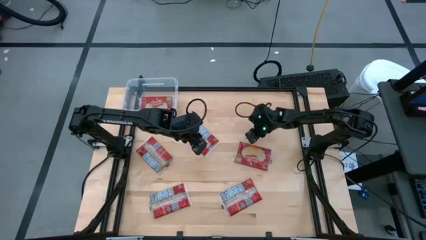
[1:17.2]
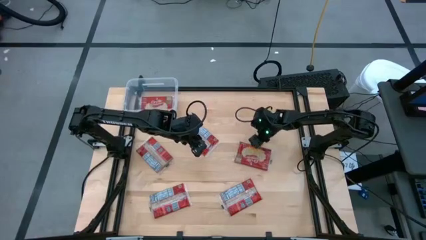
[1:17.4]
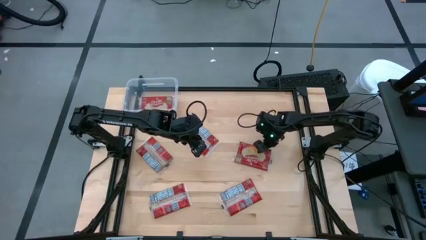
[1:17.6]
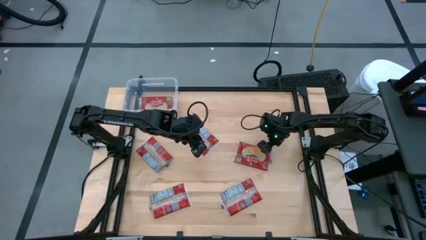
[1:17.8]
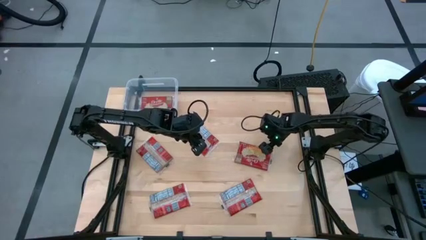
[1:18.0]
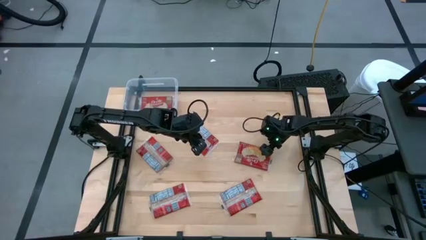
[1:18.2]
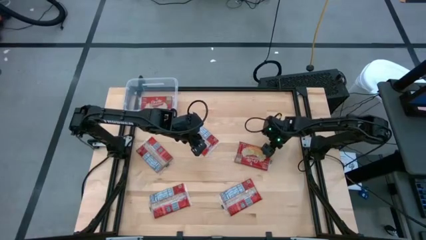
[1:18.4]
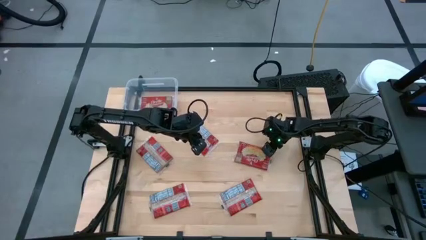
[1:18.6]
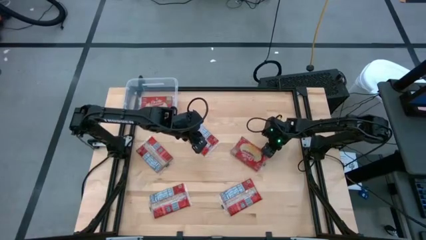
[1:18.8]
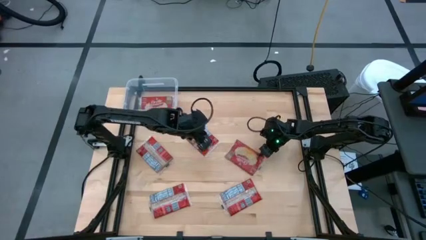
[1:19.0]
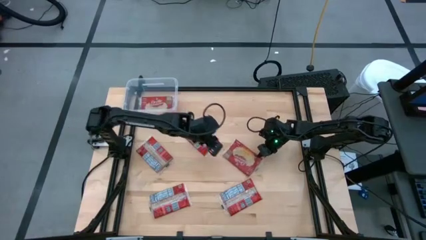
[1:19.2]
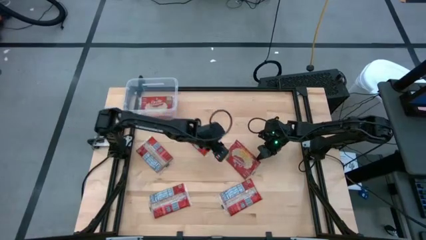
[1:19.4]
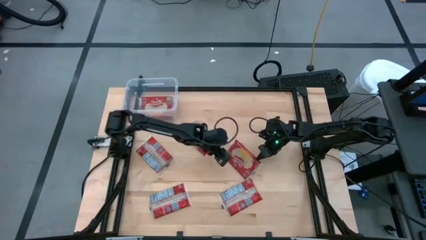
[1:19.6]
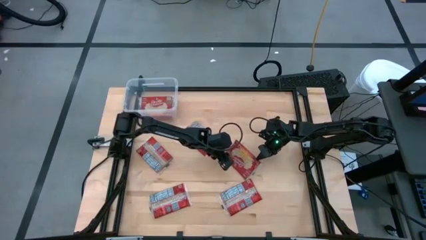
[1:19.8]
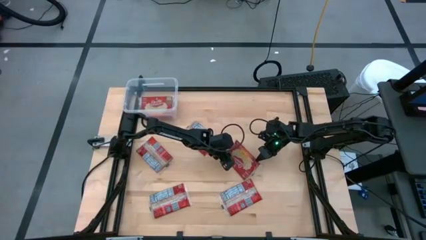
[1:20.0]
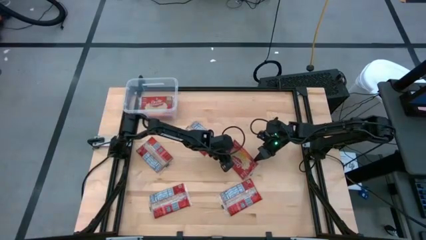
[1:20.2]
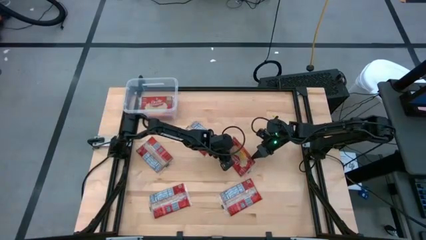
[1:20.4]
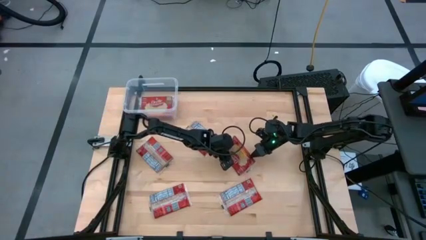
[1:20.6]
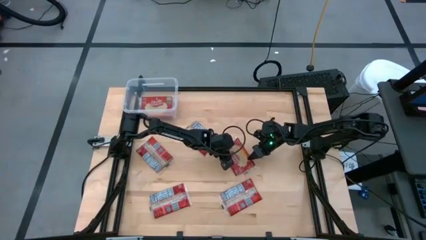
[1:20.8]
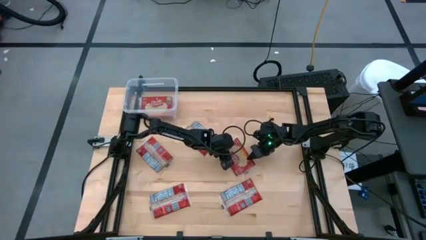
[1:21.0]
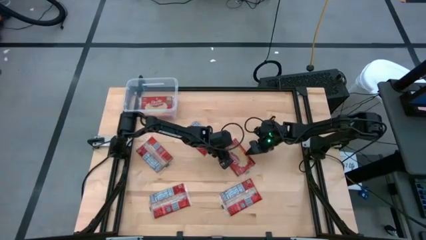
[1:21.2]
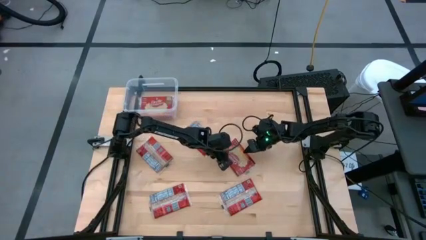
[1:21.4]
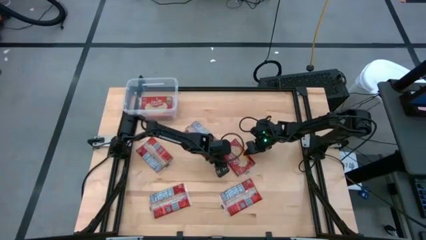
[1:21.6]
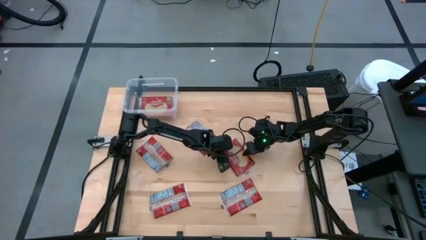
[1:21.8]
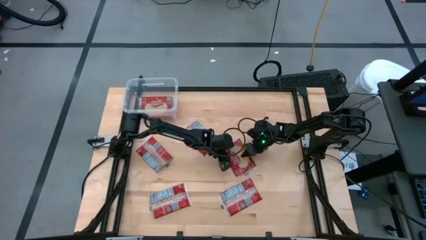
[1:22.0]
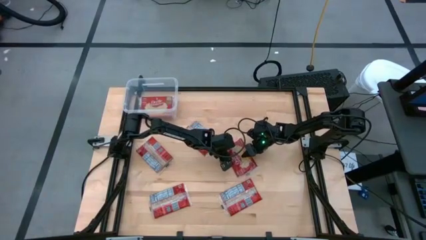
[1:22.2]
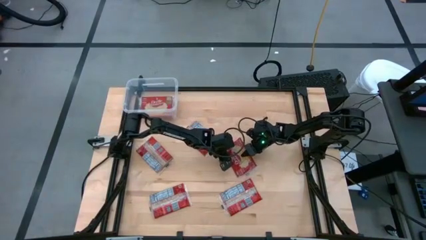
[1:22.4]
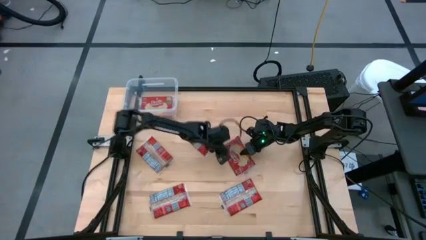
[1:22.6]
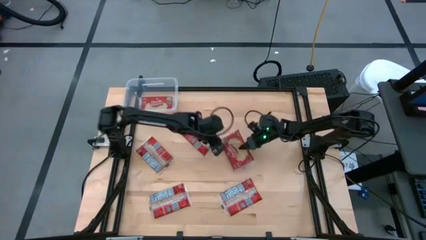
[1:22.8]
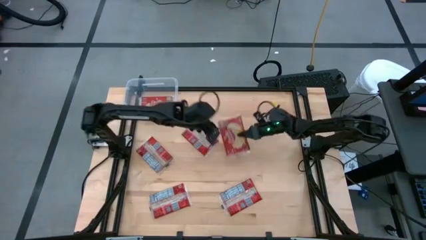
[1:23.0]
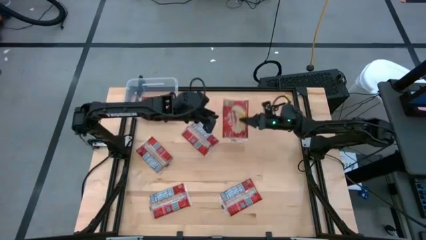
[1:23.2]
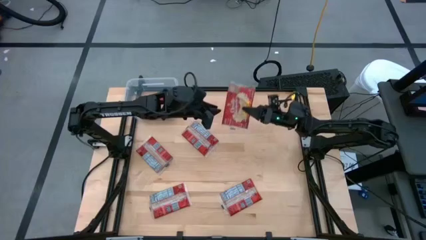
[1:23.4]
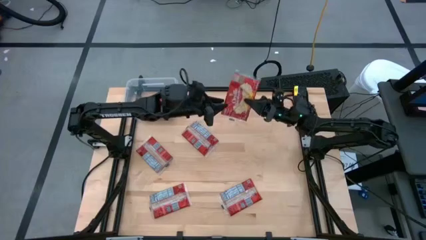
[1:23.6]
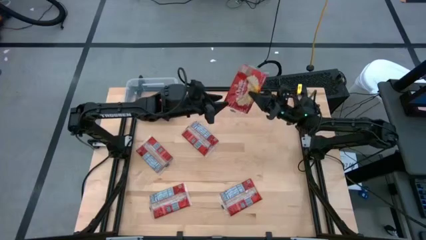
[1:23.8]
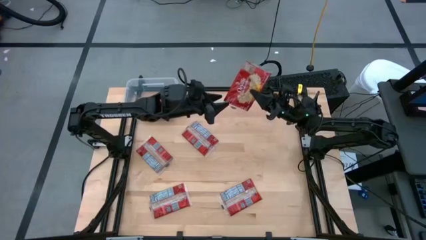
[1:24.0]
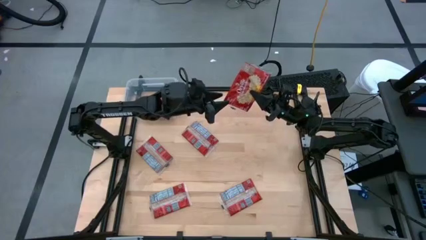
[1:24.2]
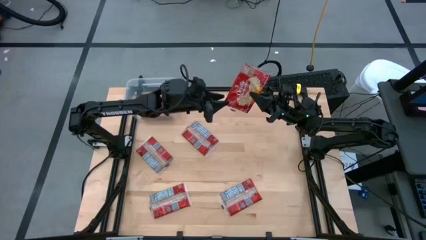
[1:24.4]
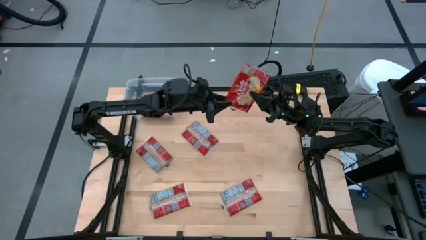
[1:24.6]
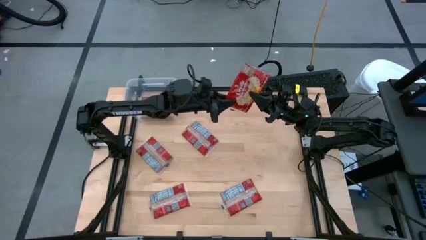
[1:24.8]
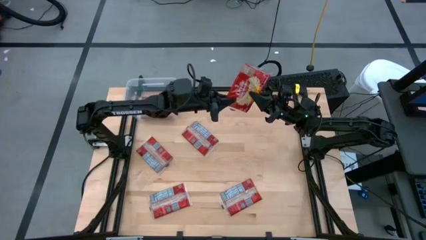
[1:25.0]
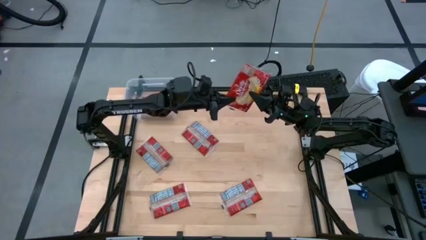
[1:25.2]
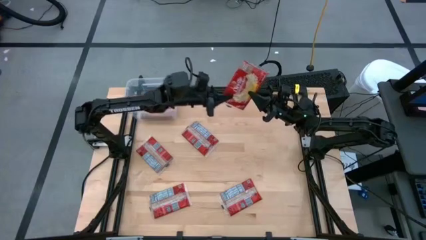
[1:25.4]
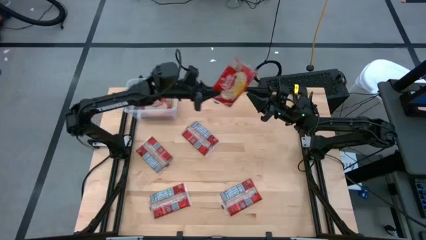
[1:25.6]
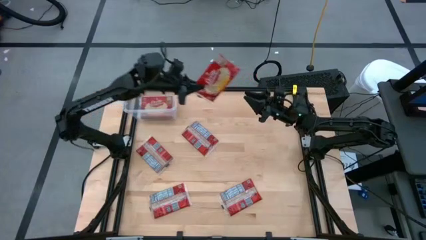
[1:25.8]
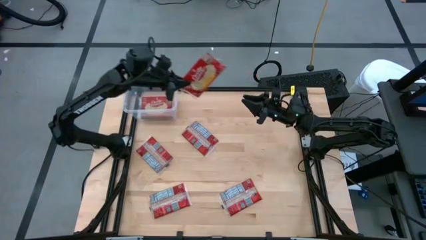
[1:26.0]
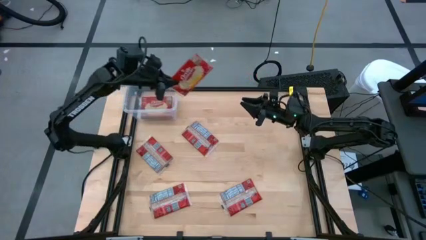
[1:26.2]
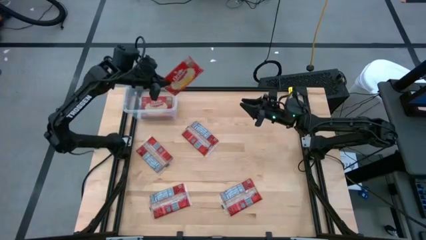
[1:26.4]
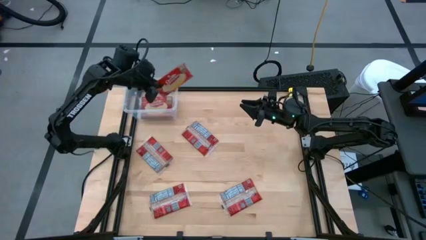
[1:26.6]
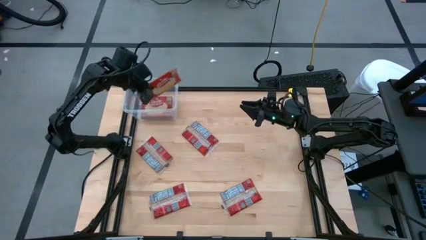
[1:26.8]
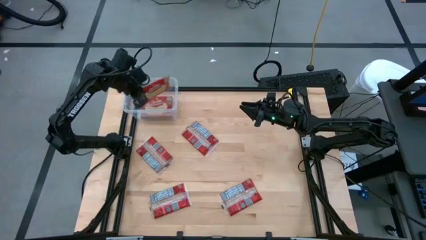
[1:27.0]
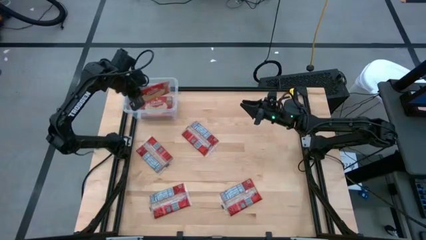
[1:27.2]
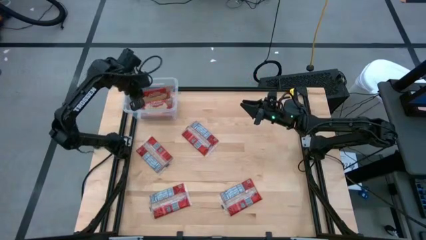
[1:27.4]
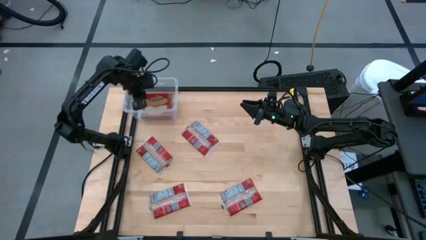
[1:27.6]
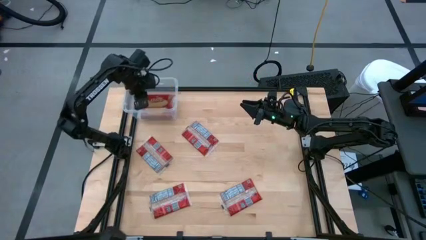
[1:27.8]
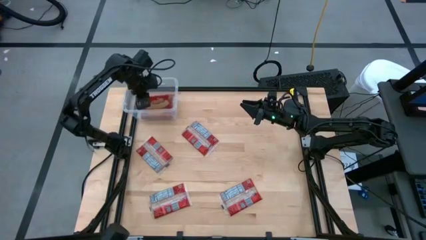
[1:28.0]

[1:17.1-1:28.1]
Task: Sort popcorn bags into baskets
Put the popcorn pack into the transparent bin
